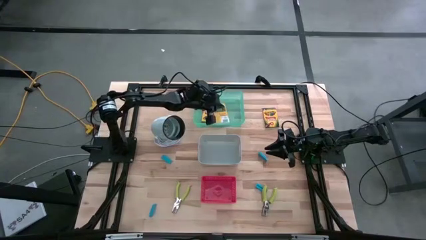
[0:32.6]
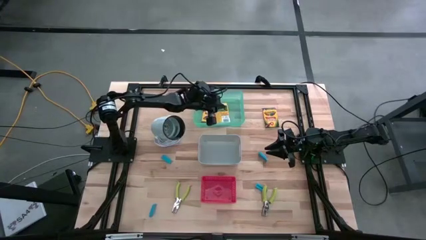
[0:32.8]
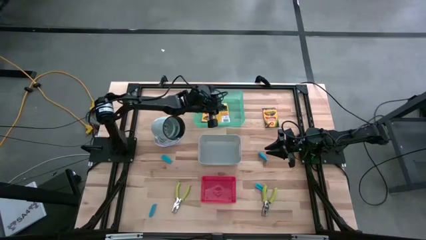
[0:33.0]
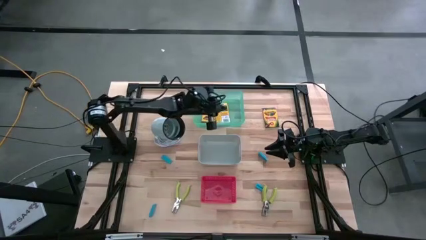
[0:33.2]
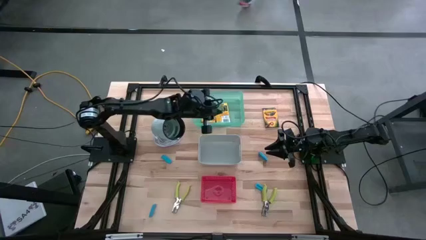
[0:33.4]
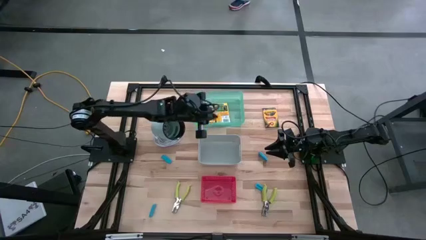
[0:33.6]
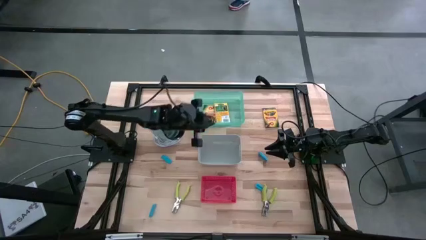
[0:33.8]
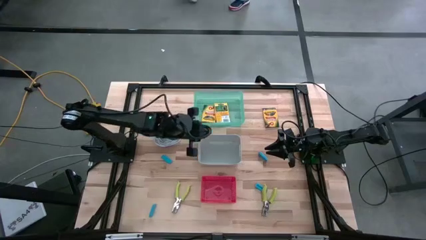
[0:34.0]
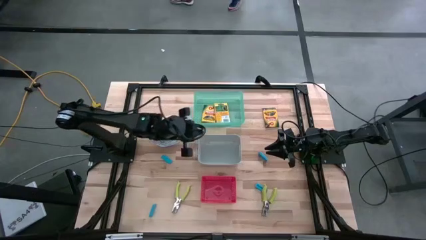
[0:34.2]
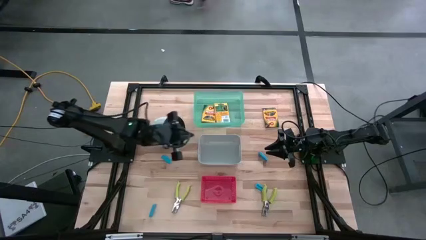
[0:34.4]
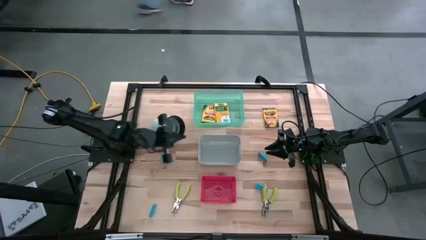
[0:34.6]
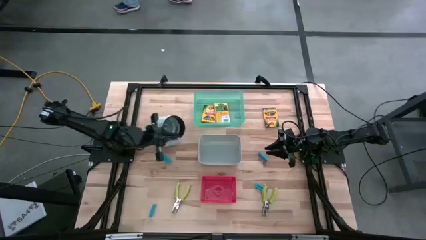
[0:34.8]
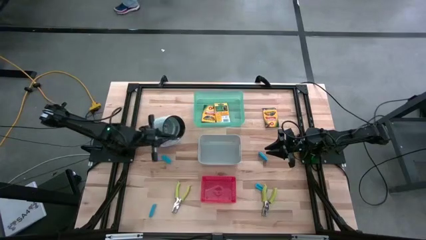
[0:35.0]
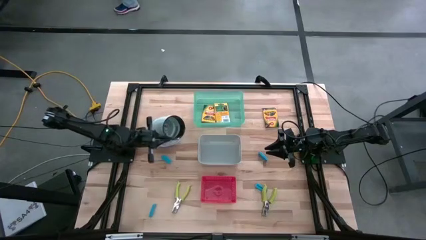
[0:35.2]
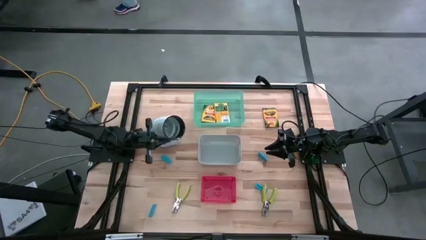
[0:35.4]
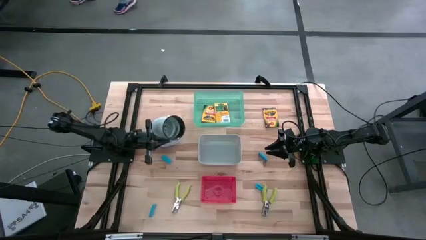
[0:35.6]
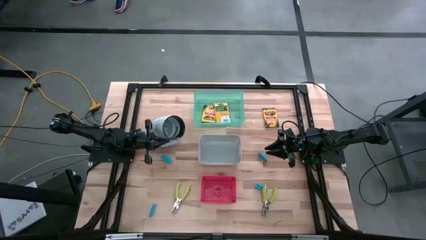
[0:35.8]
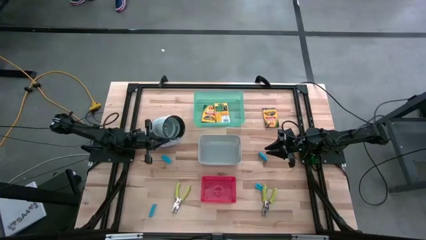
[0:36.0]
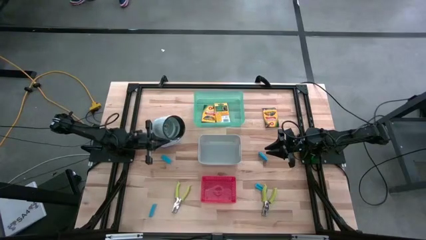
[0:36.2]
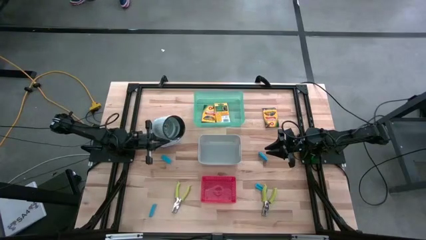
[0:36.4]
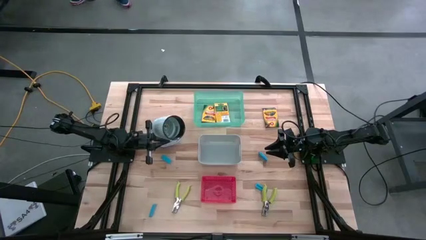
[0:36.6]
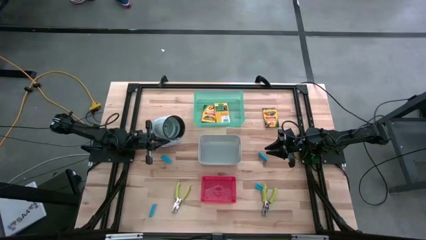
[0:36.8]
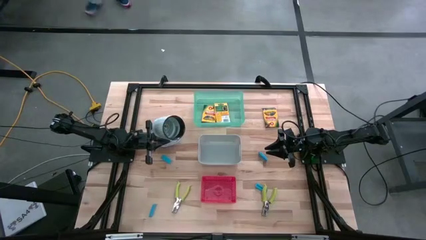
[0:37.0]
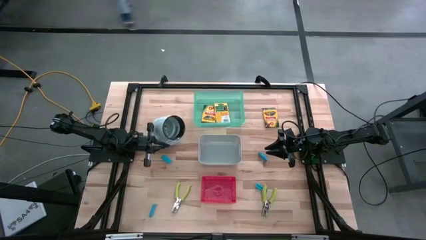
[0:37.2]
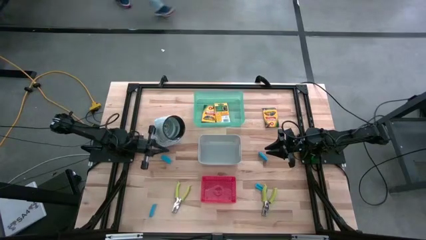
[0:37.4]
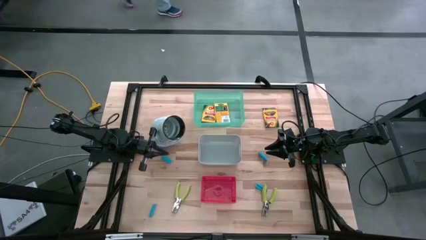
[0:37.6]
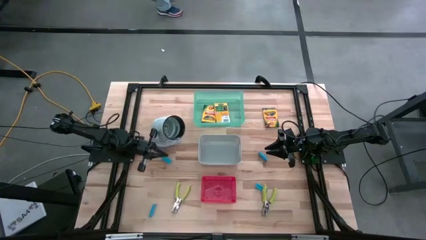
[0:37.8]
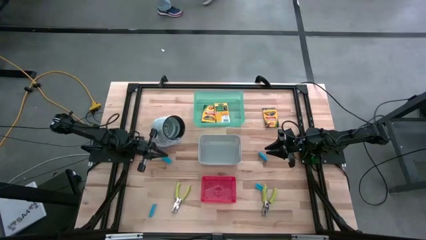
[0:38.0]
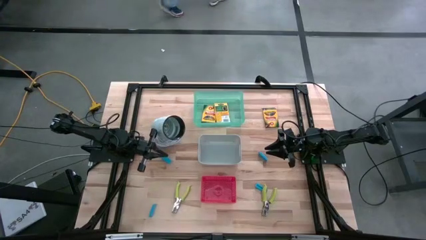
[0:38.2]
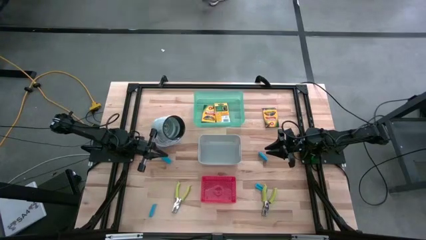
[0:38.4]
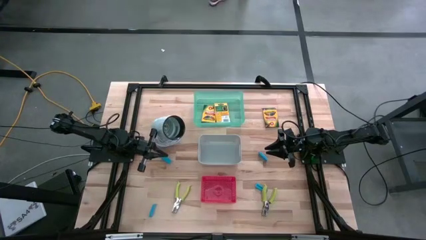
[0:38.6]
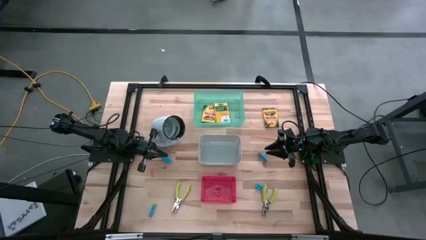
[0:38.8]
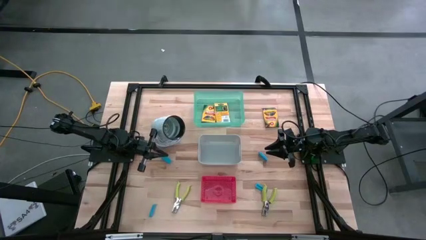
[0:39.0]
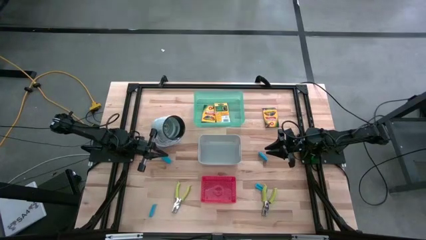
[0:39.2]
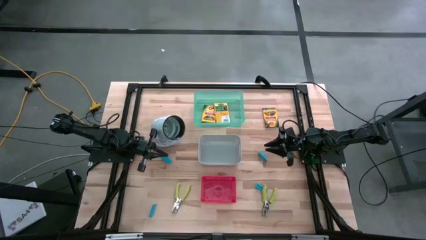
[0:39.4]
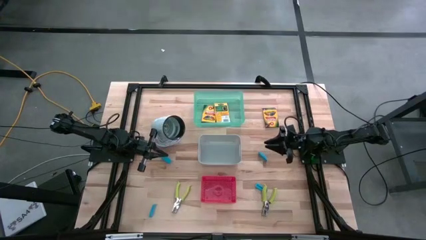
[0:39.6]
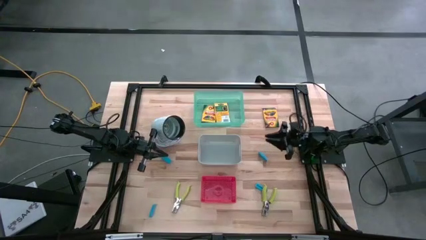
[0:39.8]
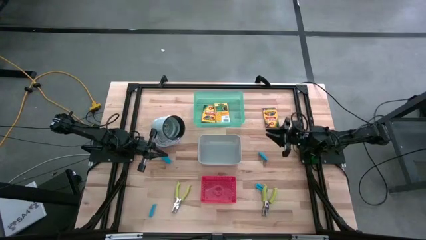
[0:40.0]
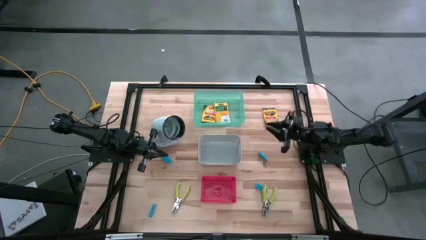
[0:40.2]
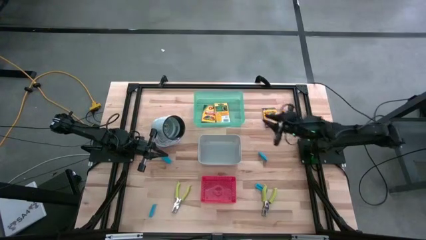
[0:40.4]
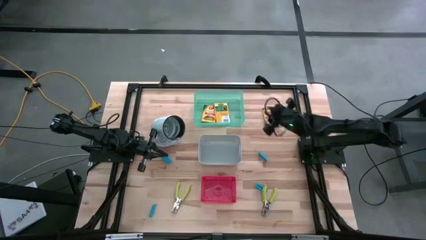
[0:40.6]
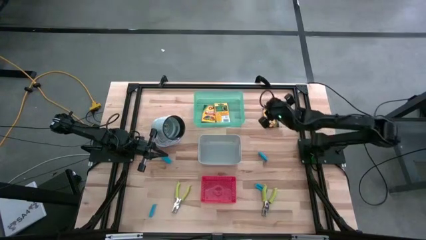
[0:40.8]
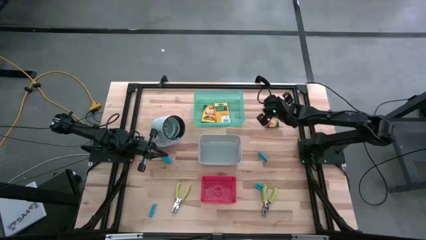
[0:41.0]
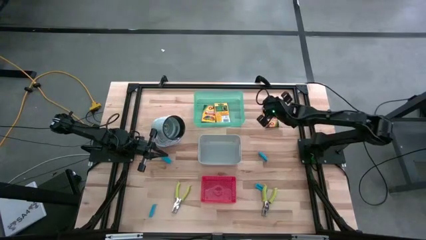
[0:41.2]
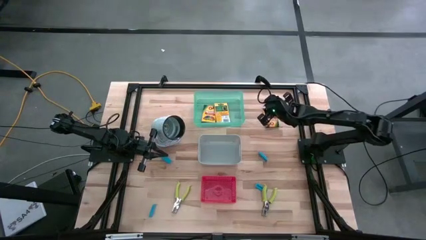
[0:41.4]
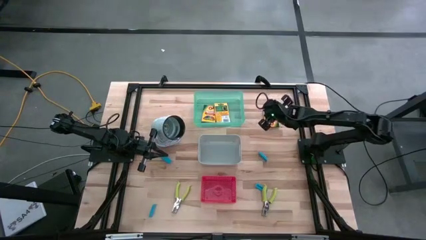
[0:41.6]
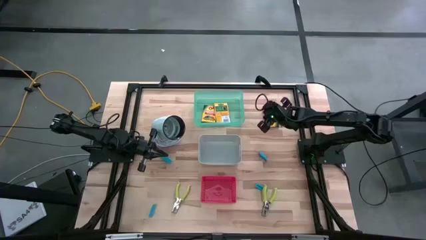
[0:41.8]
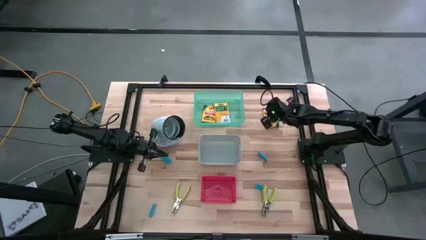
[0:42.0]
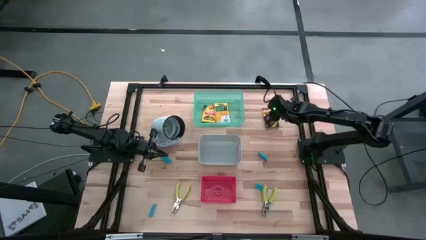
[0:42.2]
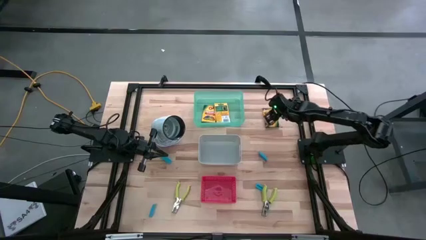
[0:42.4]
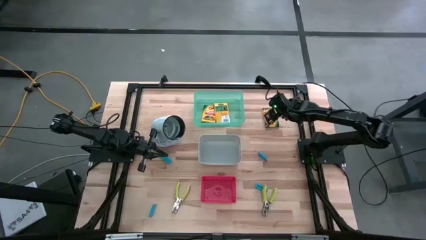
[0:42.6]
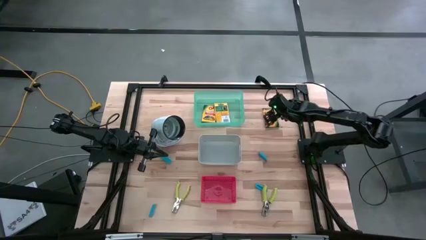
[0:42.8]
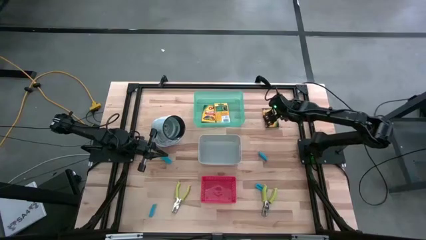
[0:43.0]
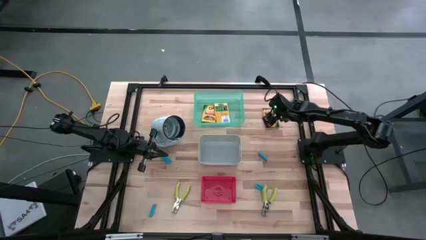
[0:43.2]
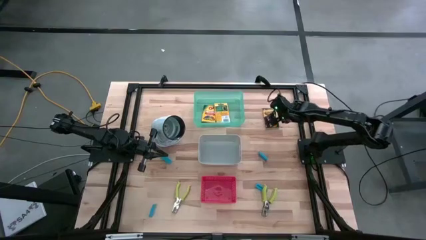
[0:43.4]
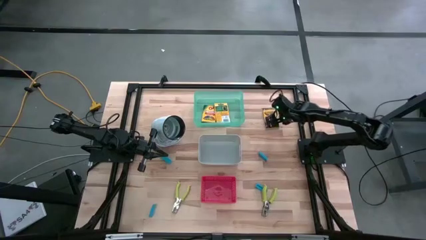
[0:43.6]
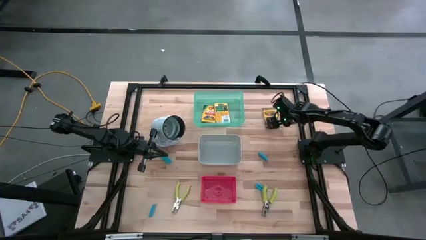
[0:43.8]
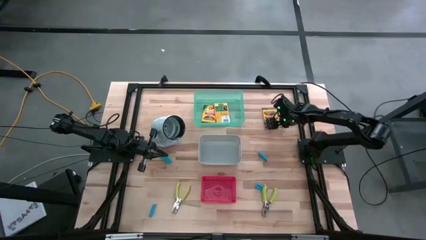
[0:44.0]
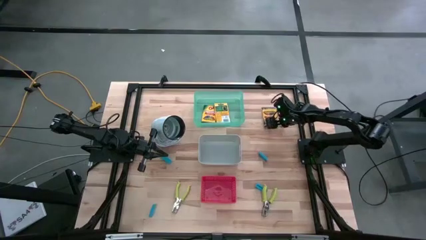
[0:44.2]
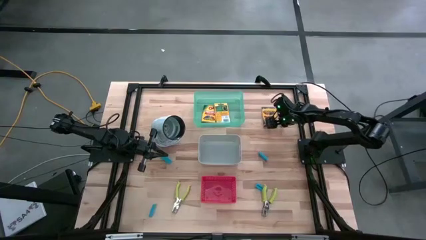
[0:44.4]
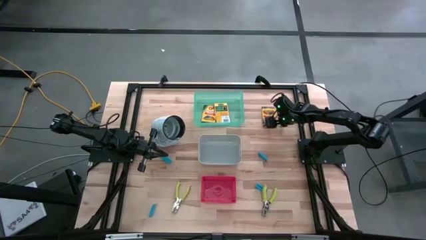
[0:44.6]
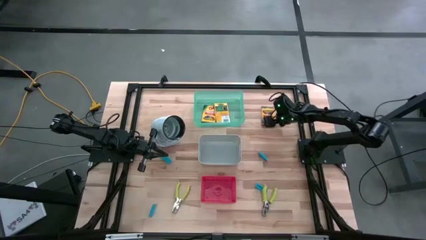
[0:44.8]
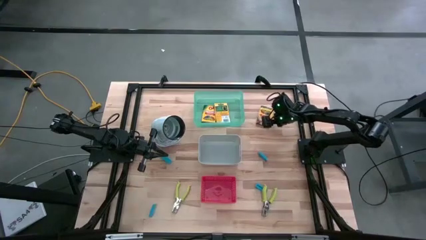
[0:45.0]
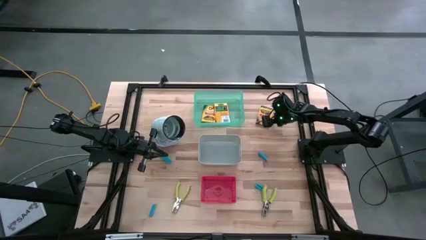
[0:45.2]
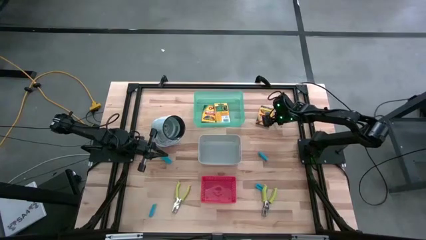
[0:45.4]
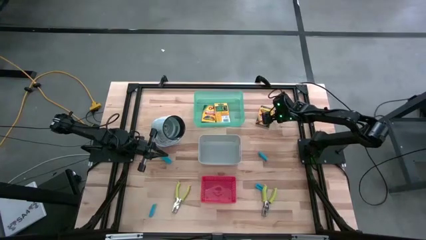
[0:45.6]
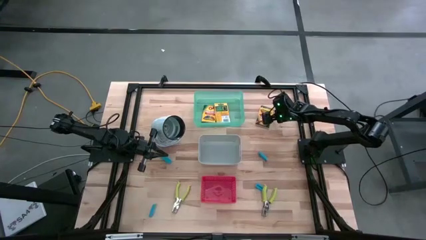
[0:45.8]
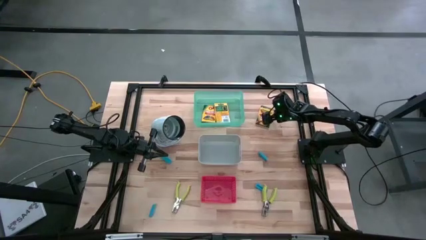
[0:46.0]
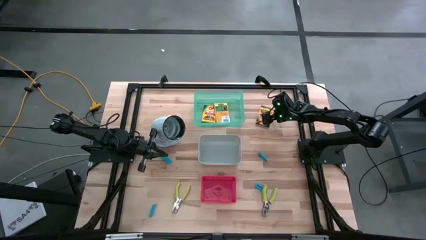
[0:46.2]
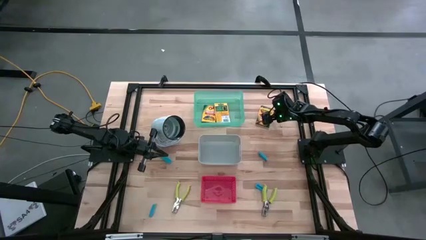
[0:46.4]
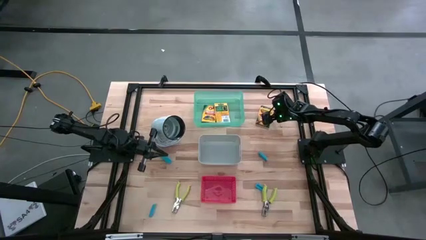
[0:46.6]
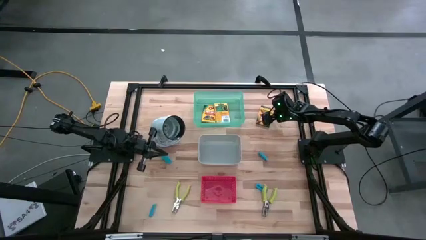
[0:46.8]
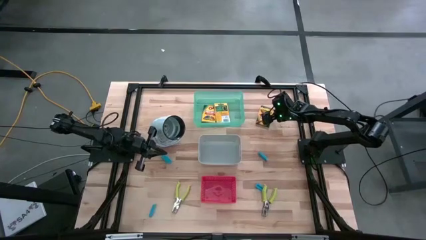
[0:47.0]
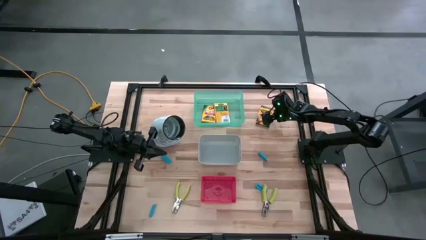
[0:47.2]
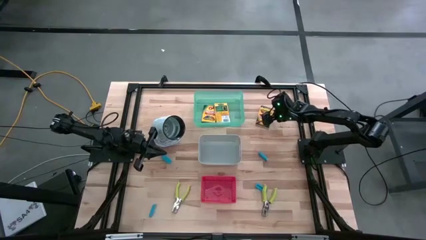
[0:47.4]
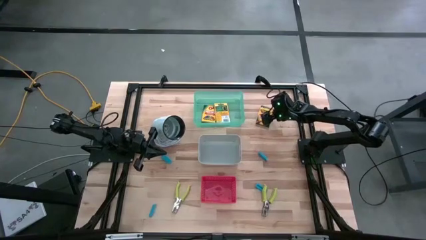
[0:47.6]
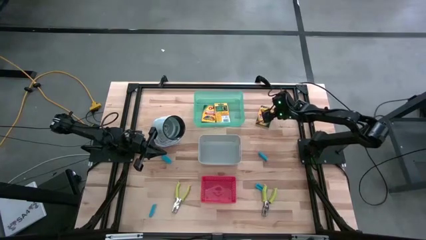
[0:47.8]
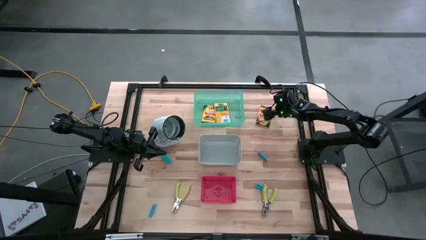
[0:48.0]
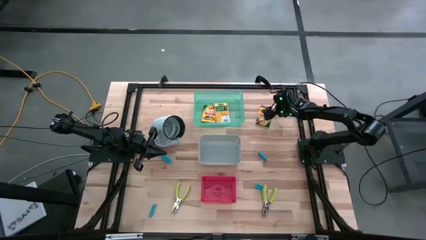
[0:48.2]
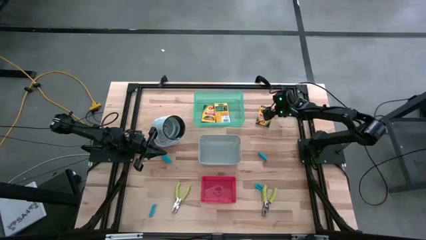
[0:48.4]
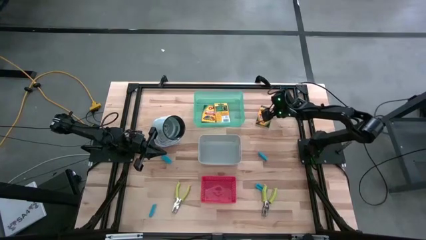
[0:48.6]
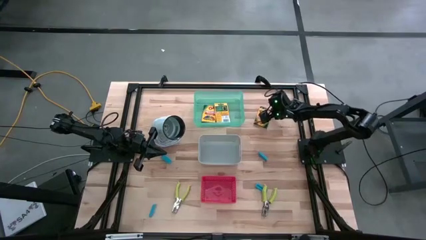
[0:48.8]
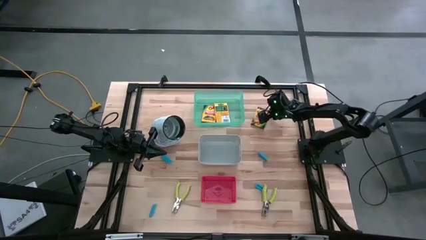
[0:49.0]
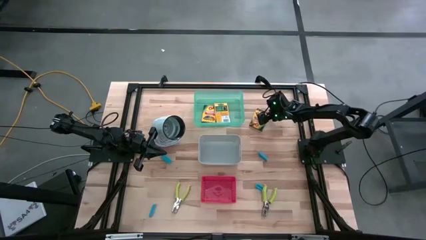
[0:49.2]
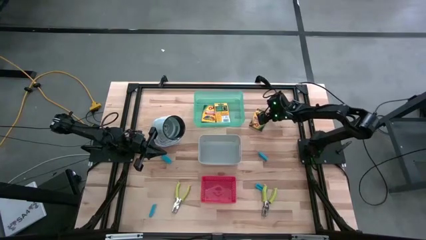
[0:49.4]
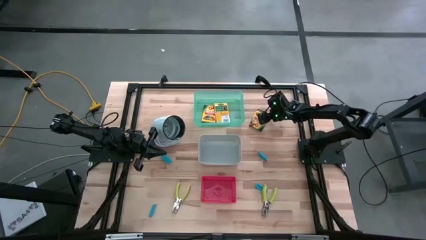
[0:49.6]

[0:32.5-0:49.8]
Task: Pick & Place School Supplies
Put the yellow crayon box into the green bin
